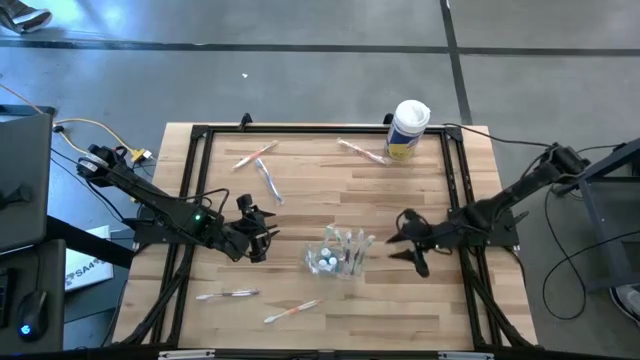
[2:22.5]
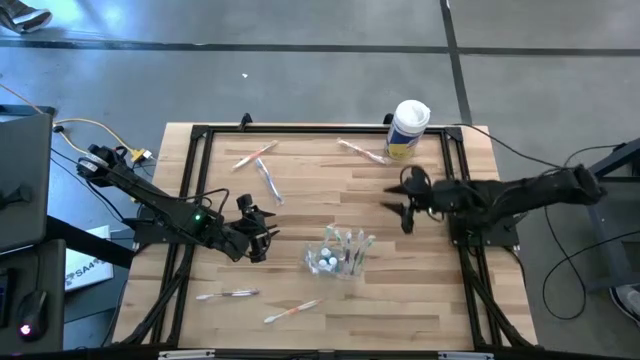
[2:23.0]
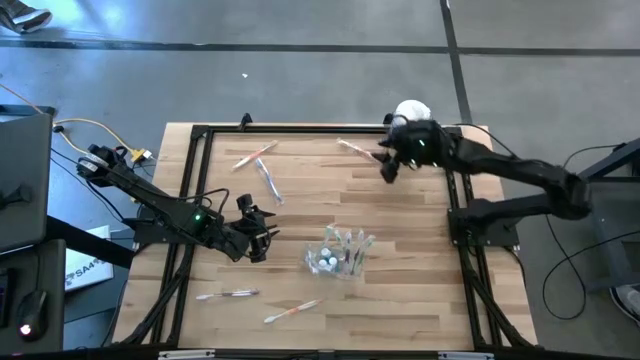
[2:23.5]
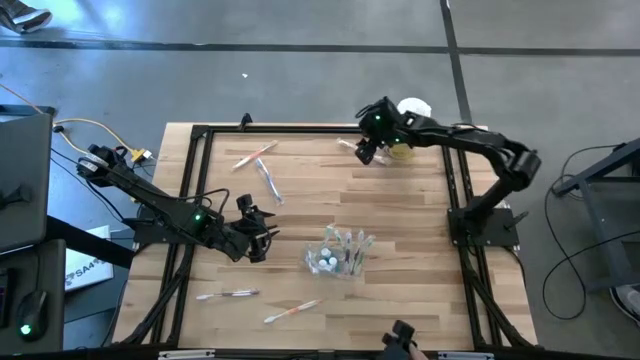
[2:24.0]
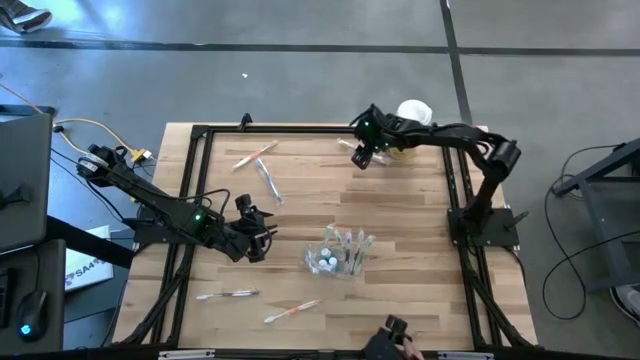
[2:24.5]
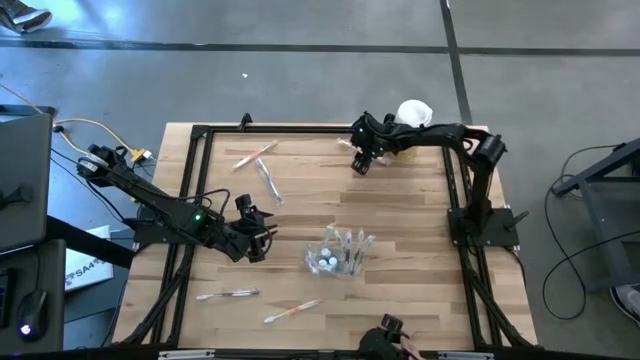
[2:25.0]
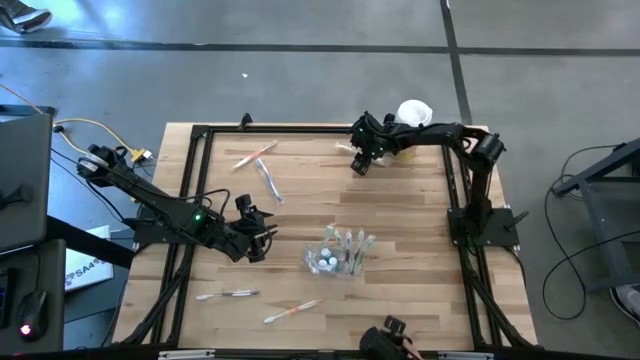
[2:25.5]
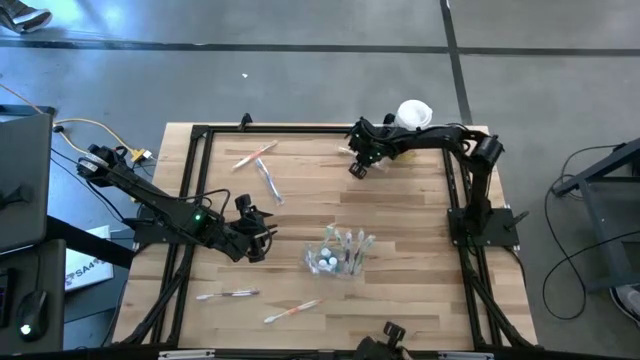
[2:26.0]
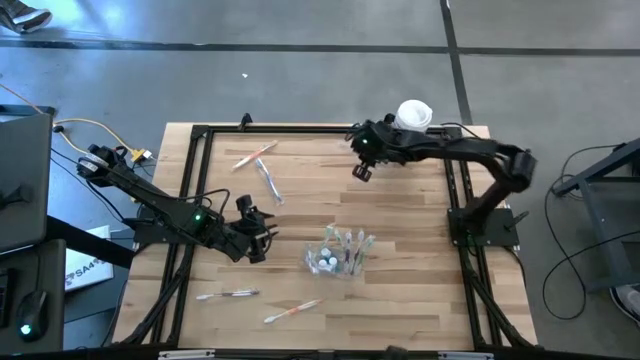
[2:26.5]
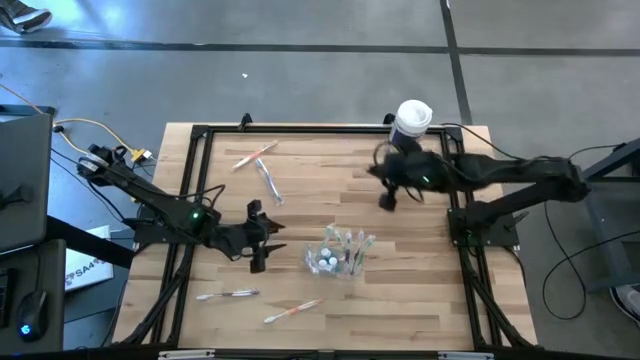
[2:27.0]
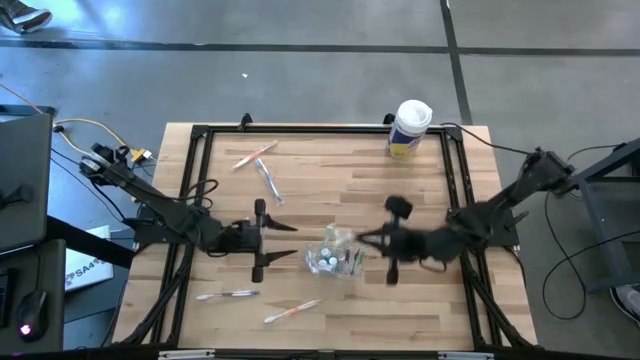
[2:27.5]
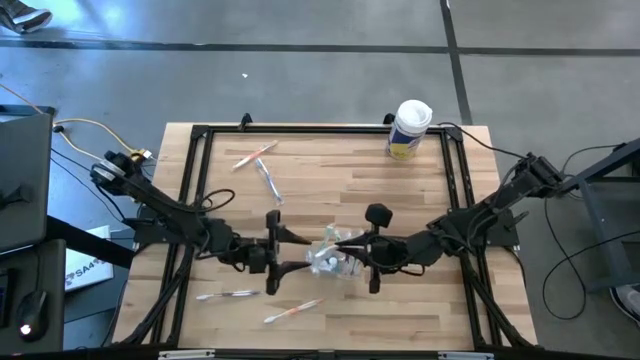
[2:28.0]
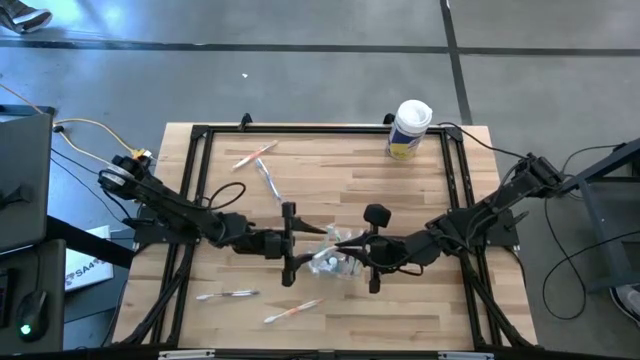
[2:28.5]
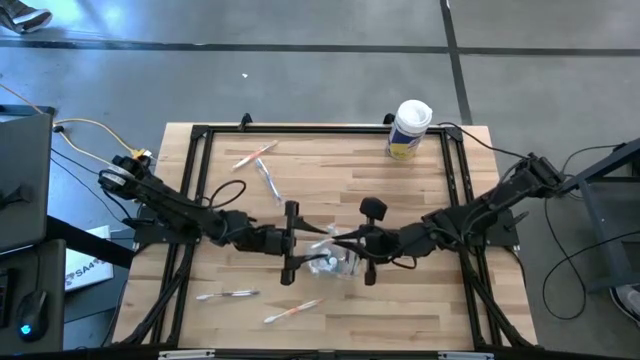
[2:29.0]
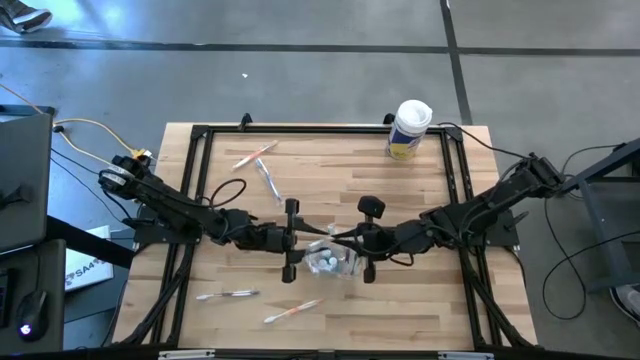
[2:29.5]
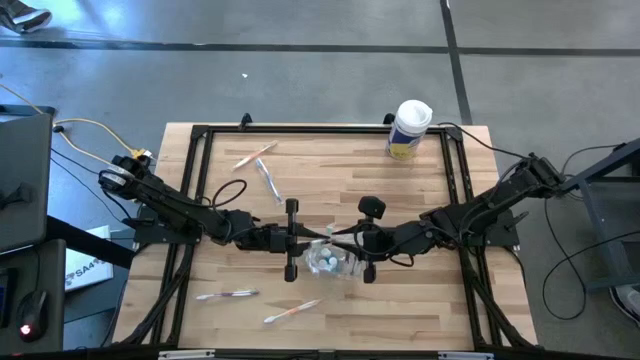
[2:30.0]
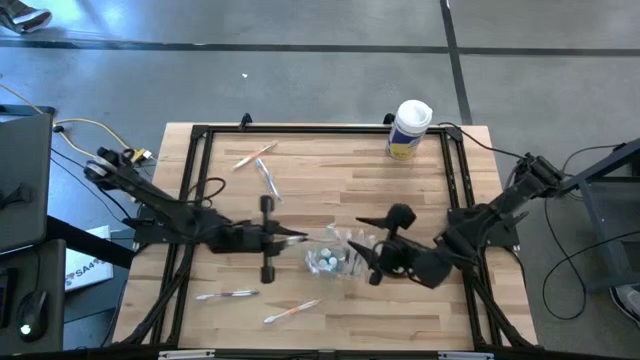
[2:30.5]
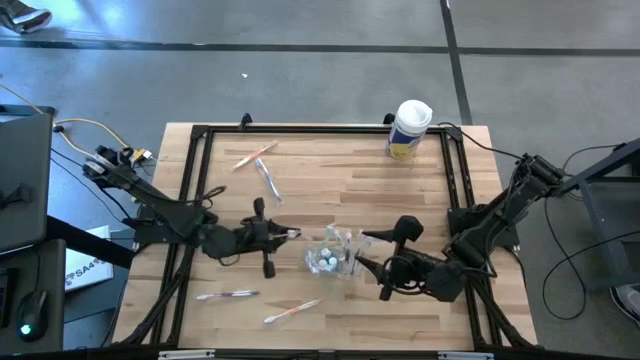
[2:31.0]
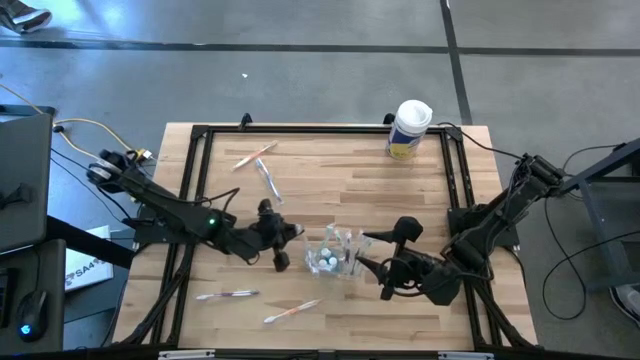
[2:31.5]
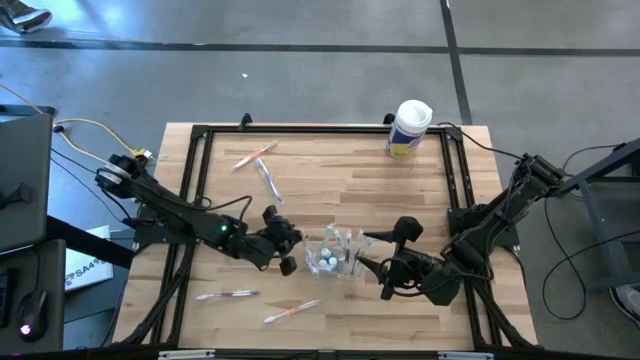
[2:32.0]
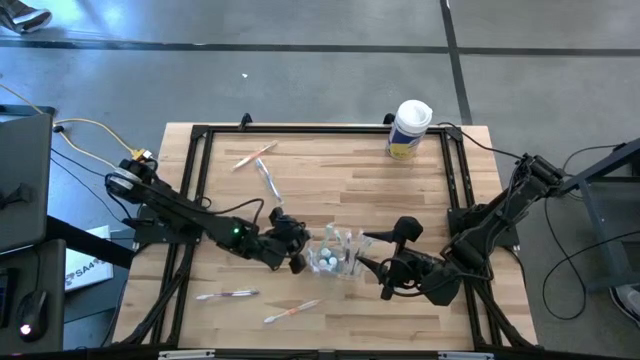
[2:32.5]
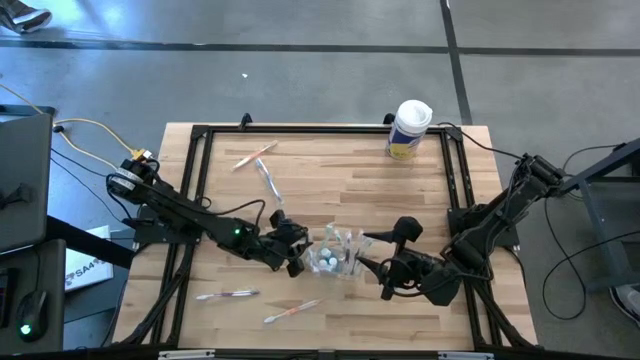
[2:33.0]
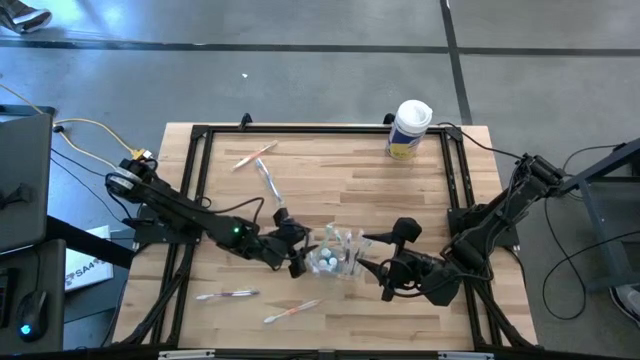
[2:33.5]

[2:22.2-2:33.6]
Task: Pick & Place toothbrushing station
Put the top right orange toothbrush into the transparent organizer
